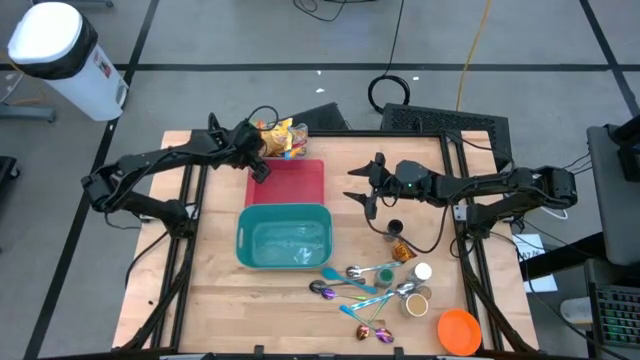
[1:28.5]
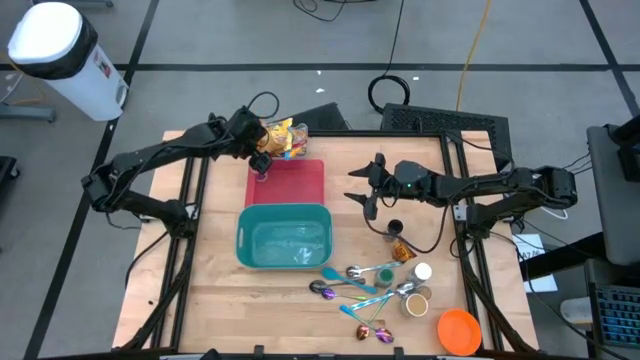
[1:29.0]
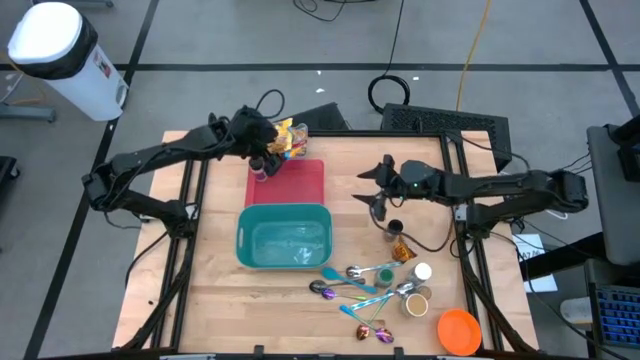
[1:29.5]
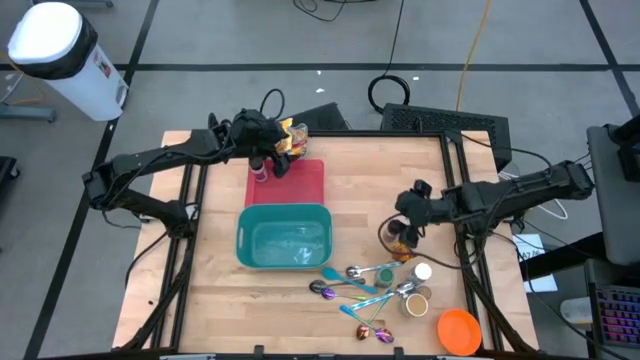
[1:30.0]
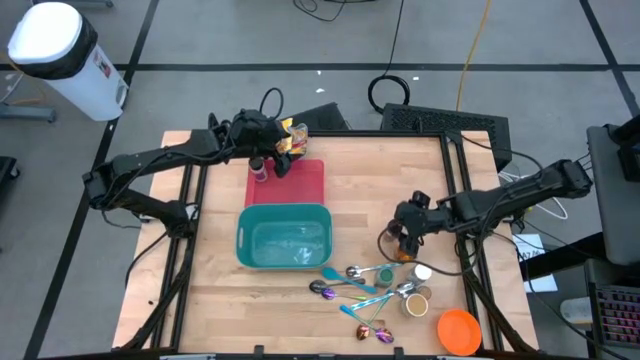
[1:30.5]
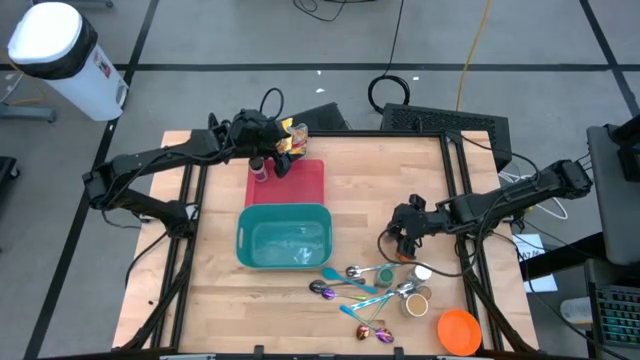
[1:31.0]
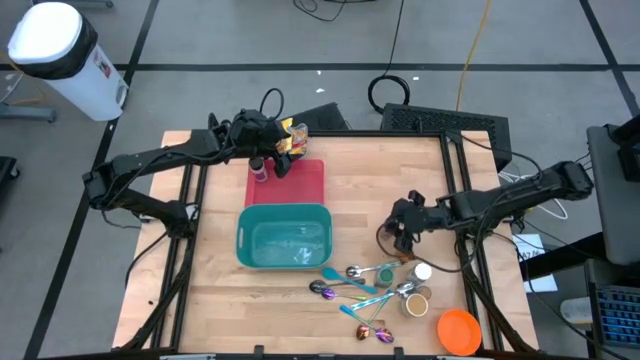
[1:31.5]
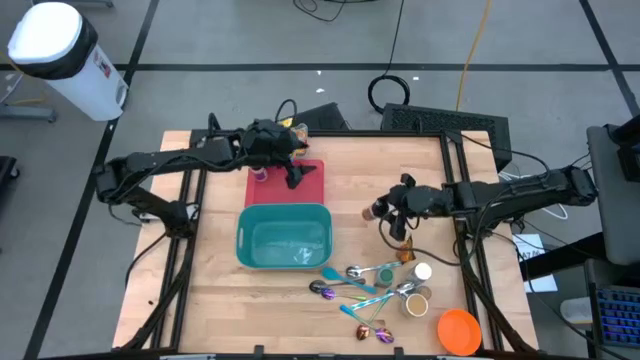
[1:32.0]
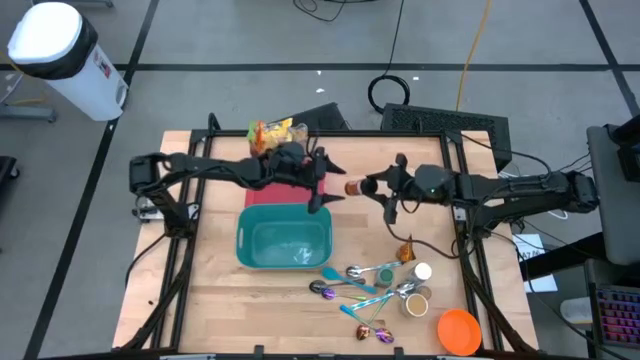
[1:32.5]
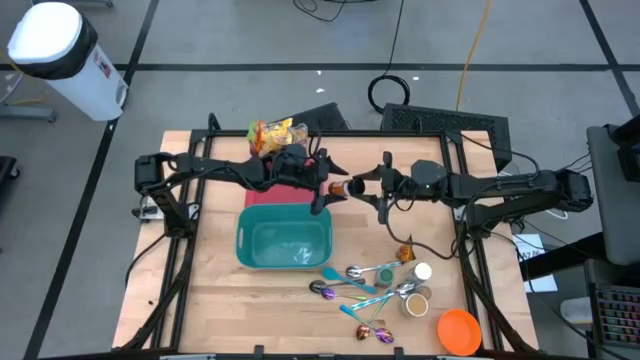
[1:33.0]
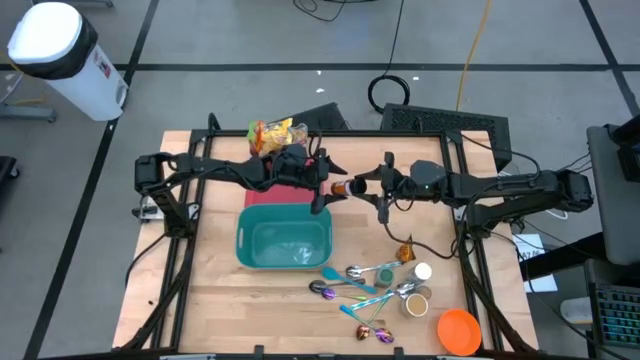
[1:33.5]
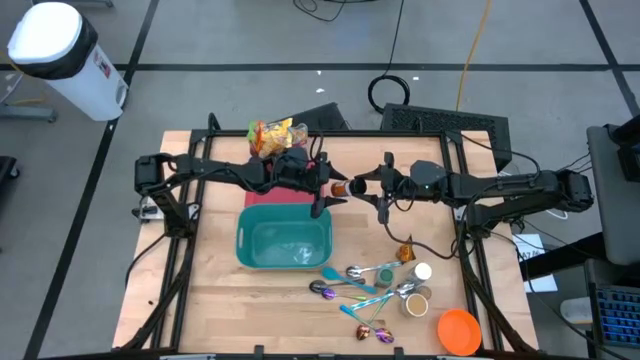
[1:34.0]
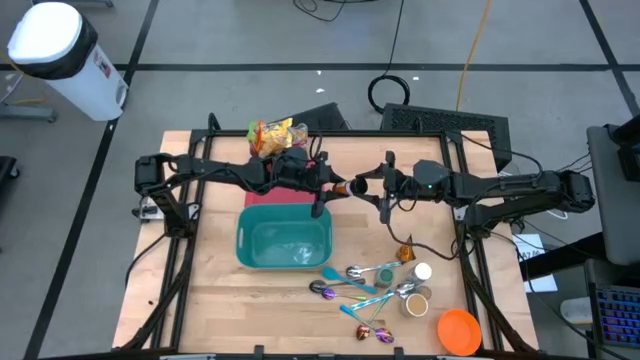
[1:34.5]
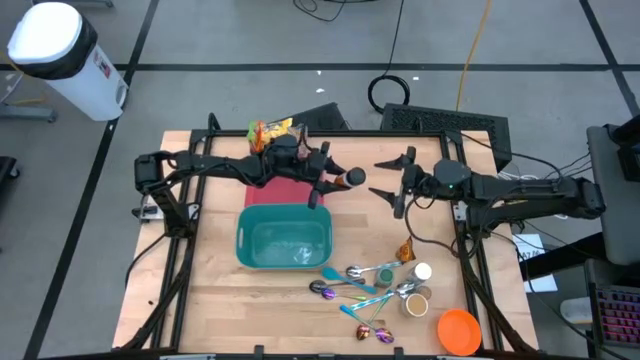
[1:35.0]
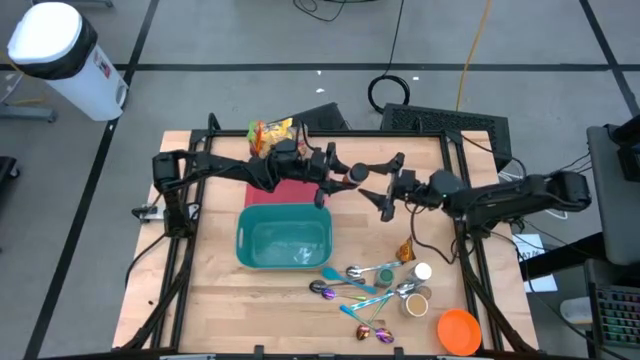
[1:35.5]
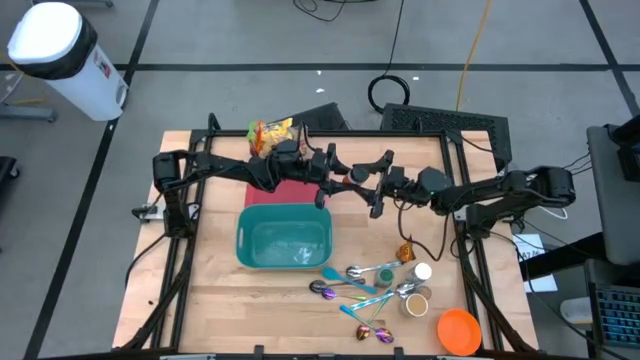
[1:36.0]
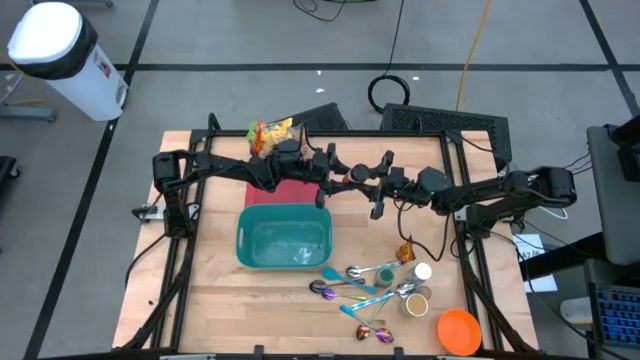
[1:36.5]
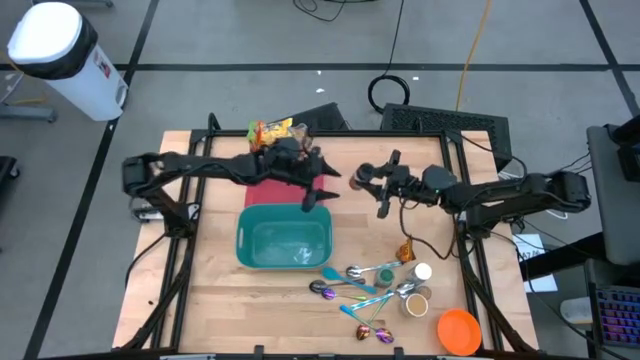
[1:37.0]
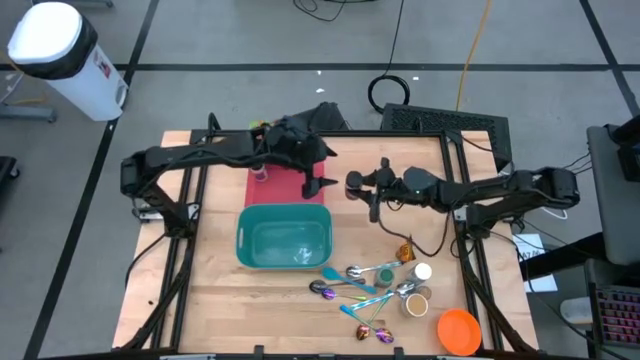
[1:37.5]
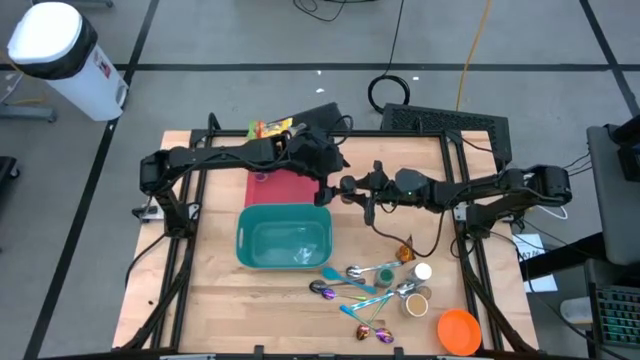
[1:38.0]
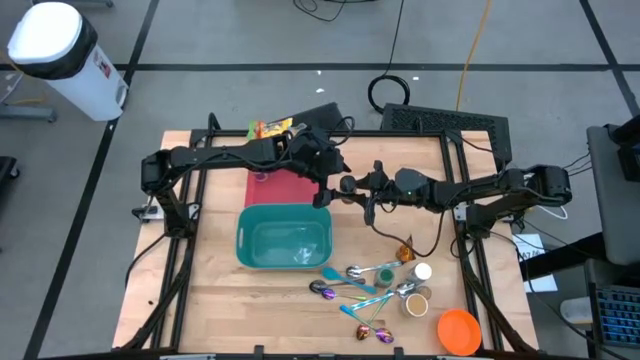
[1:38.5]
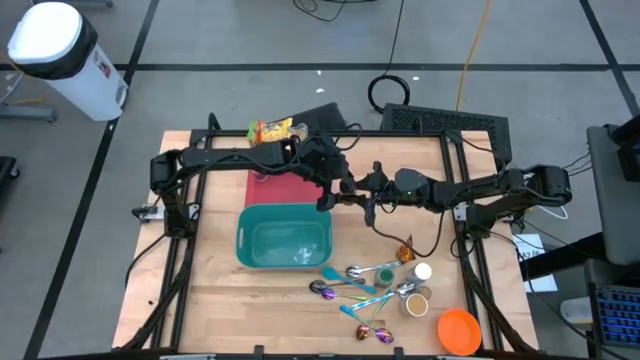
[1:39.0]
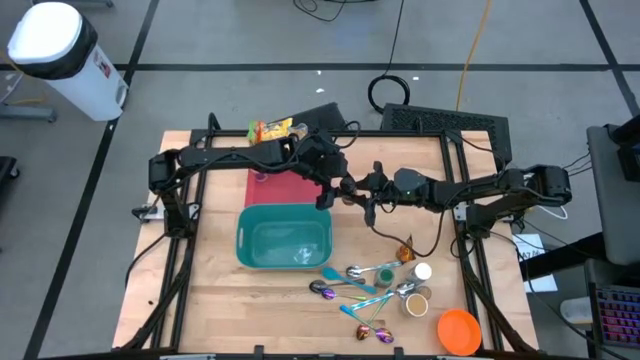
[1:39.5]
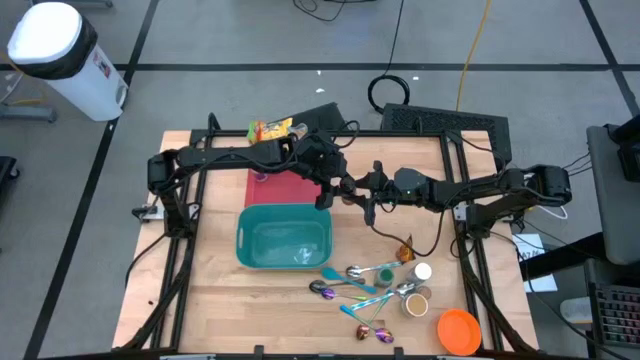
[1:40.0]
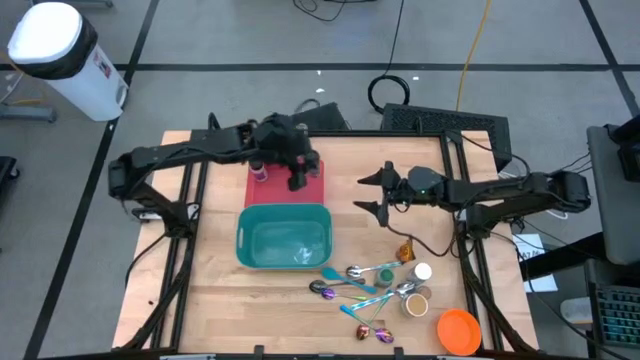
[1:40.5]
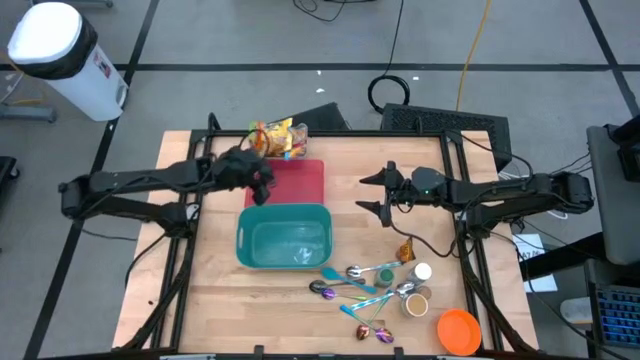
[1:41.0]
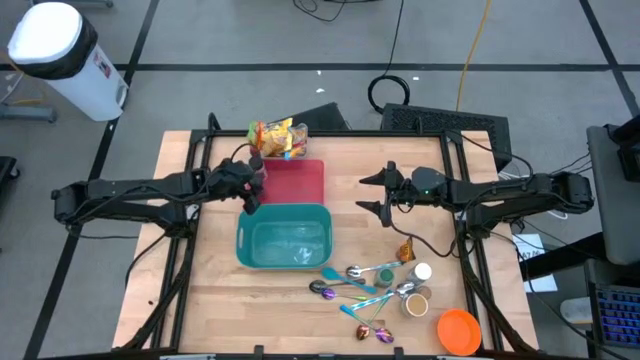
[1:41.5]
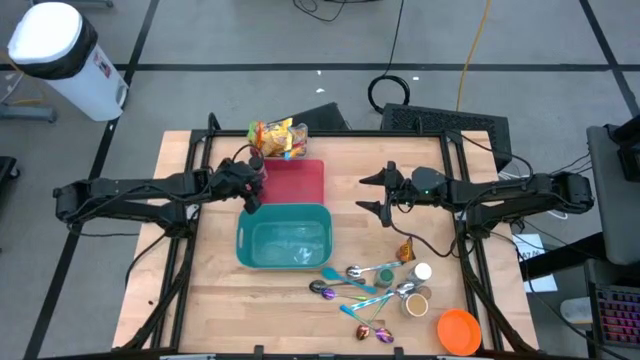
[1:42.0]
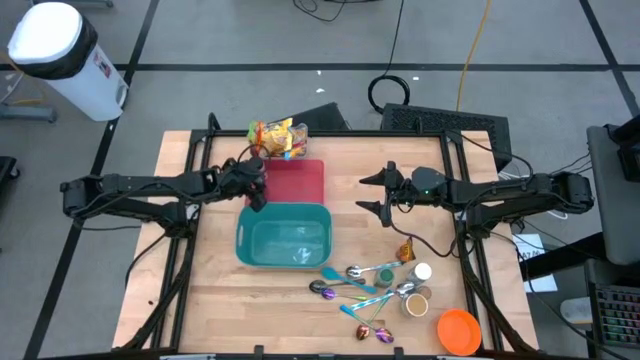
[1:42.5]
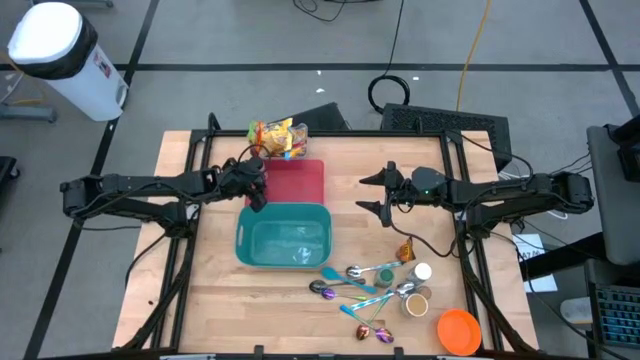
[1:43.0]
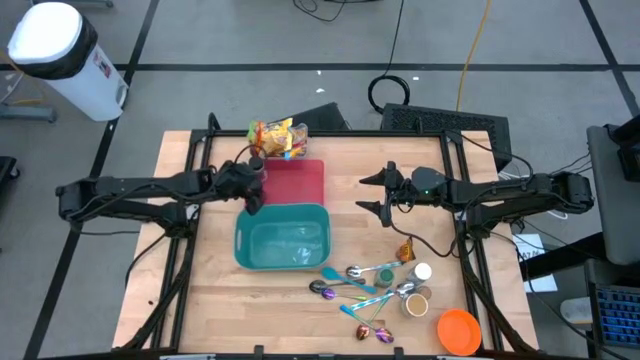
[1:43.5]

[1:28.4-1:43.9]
Task: Pick & Place Food Item
Put the brown seasoning bottle into the red bin

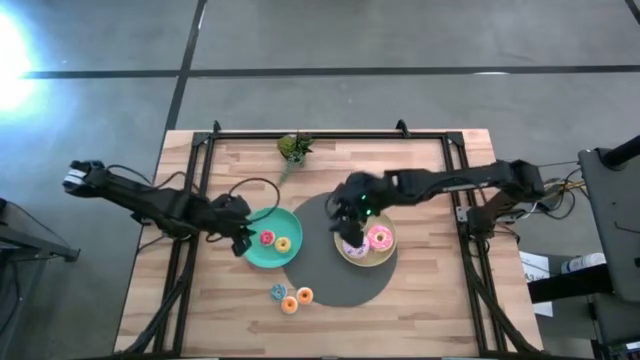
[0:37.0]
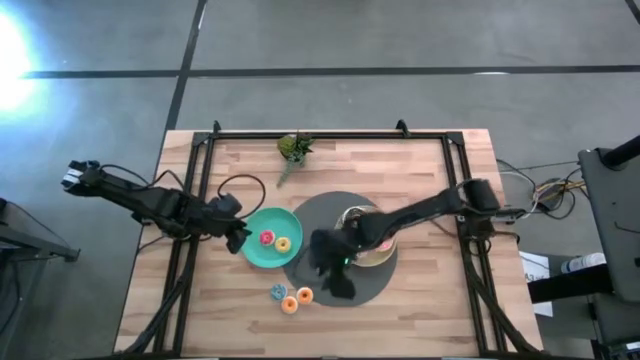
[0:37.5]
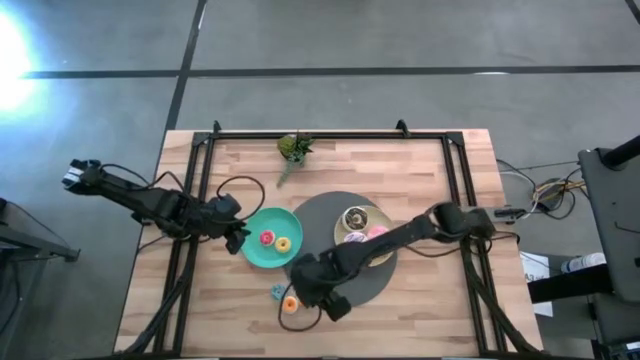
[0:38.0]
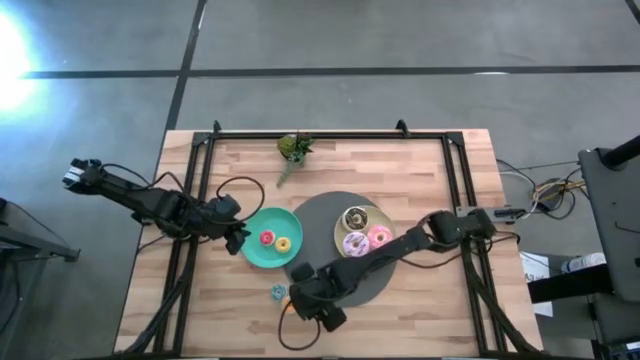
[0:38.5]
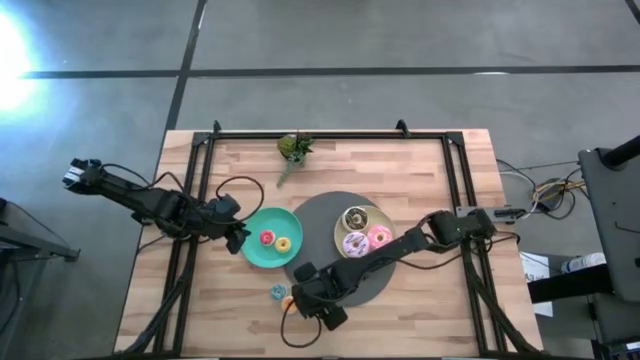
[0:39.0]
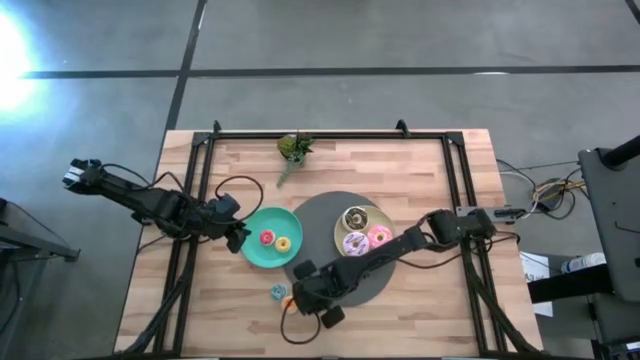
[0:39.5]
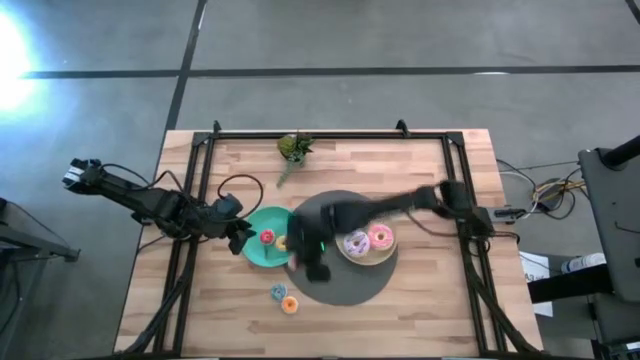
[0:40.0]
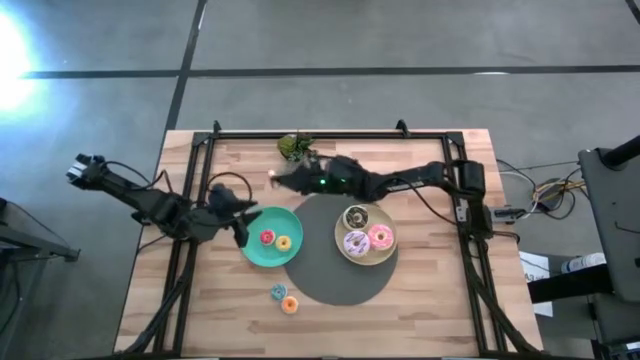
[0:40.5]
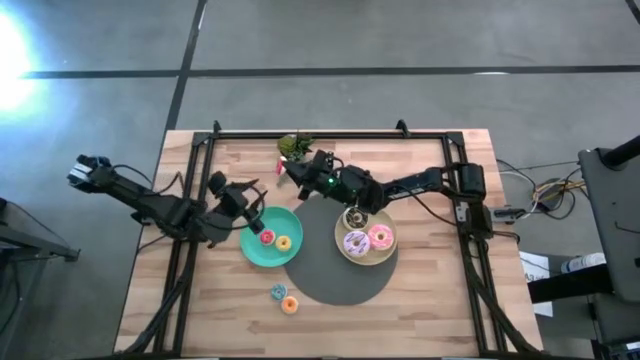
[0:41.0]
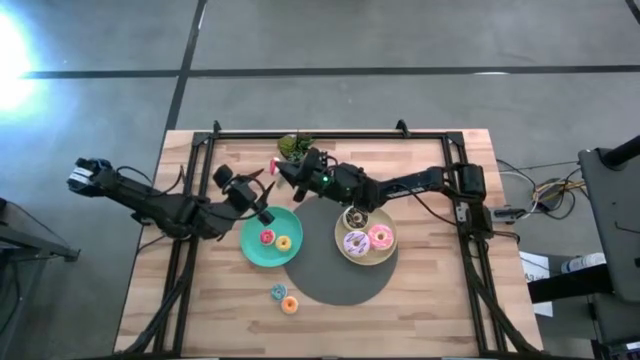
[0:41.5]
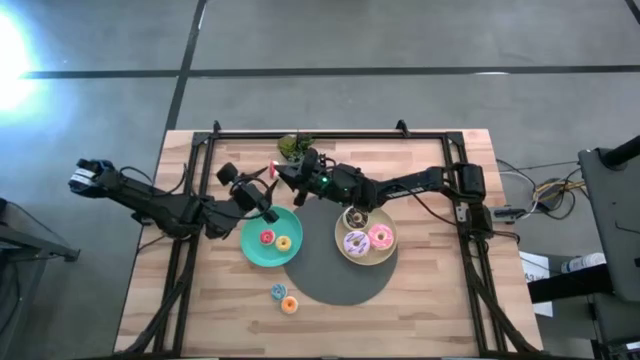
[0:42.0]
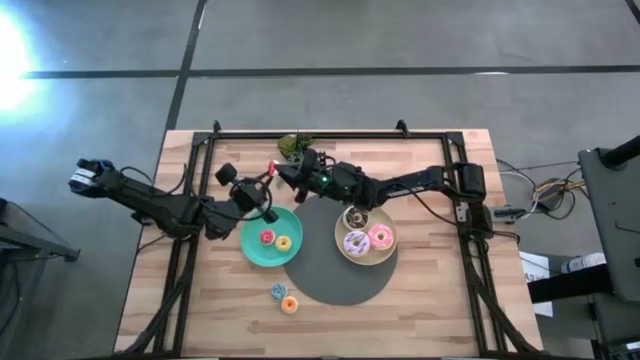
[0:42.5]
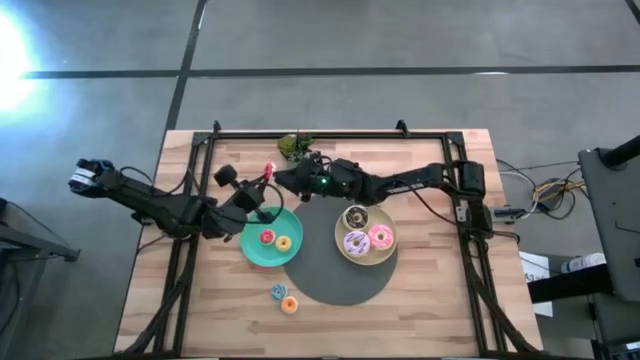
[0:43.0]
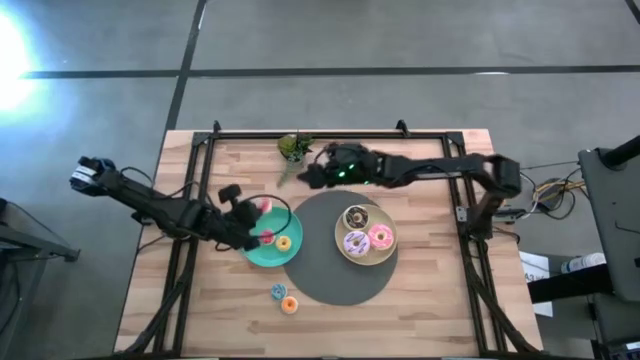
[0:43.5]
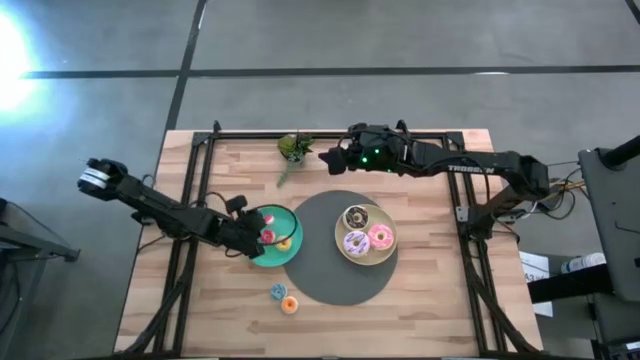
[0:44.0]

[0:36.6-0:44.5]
Task: Pick & Place donuts
Put the red doughnut on the green plate
